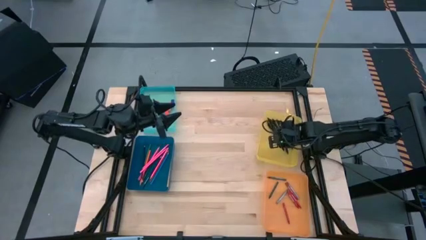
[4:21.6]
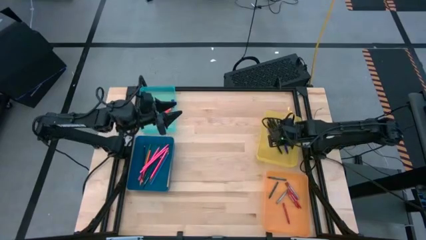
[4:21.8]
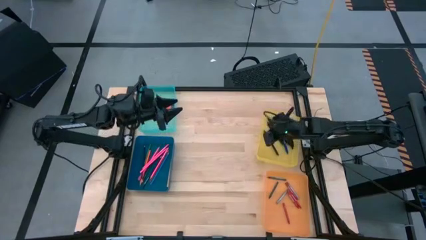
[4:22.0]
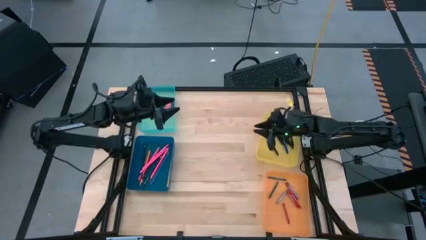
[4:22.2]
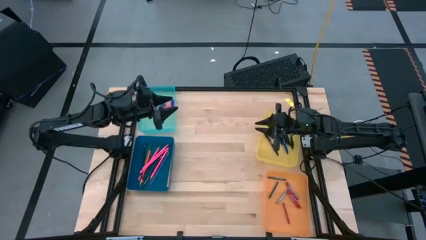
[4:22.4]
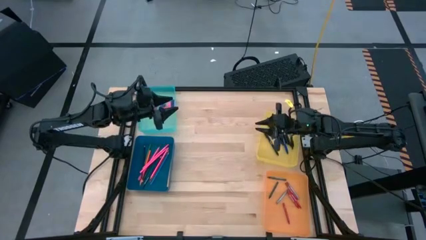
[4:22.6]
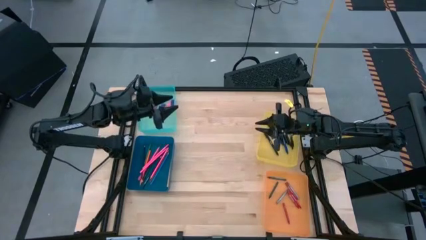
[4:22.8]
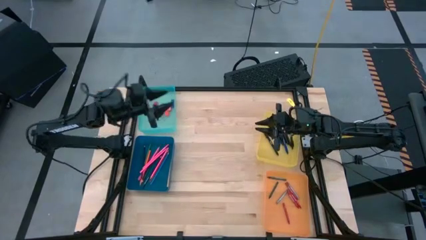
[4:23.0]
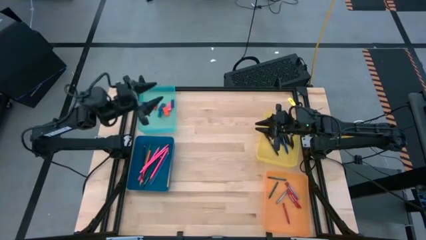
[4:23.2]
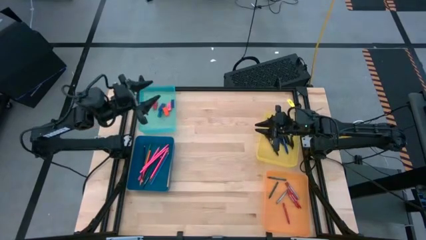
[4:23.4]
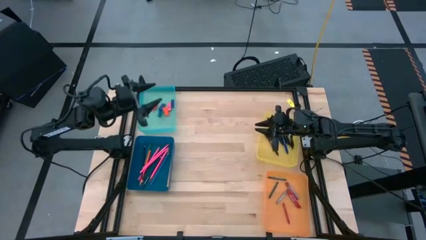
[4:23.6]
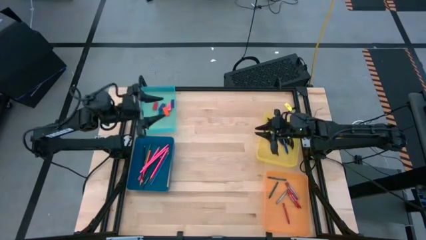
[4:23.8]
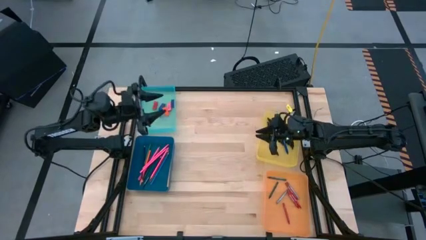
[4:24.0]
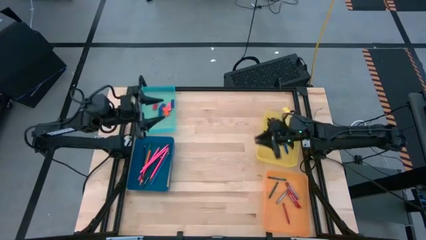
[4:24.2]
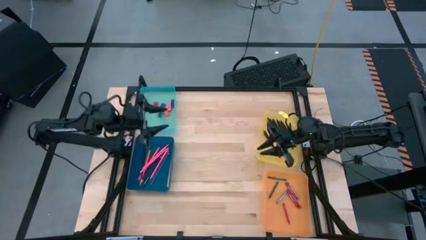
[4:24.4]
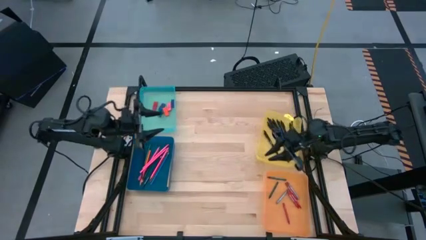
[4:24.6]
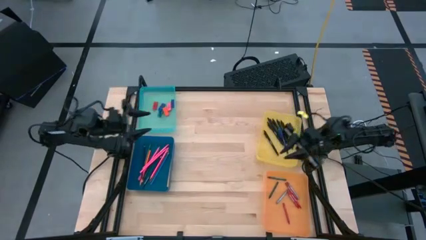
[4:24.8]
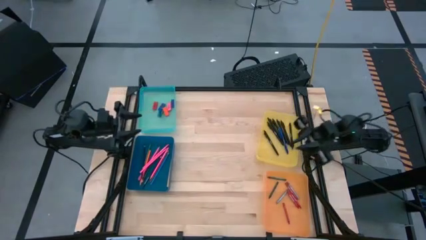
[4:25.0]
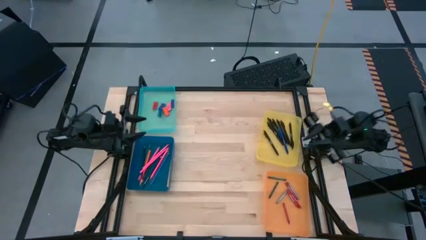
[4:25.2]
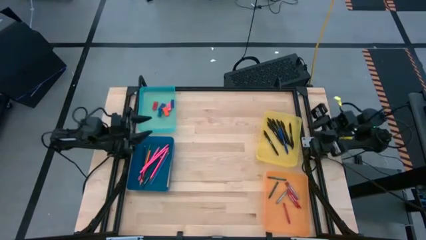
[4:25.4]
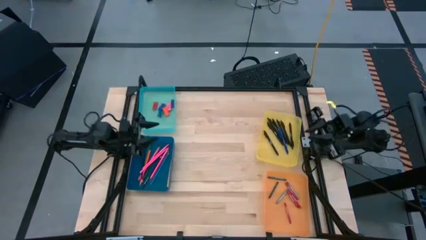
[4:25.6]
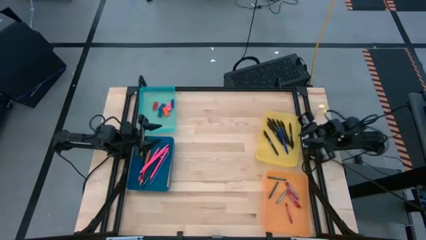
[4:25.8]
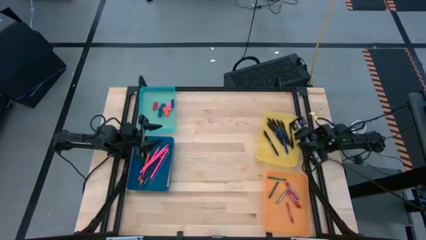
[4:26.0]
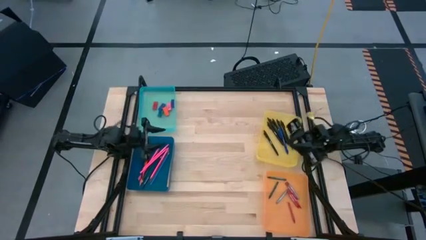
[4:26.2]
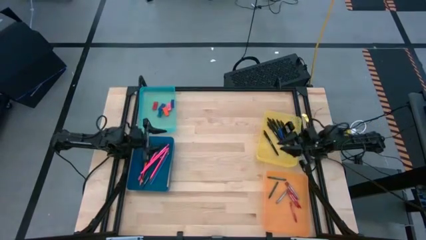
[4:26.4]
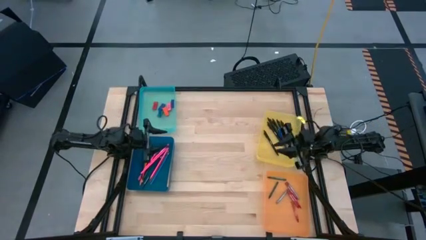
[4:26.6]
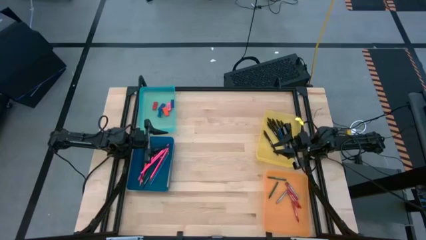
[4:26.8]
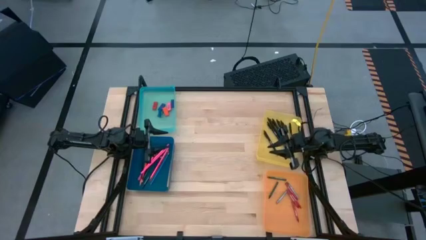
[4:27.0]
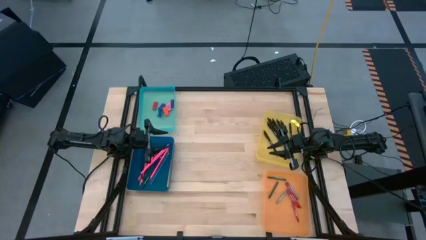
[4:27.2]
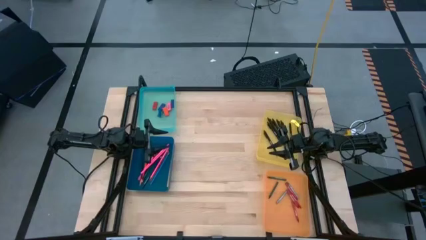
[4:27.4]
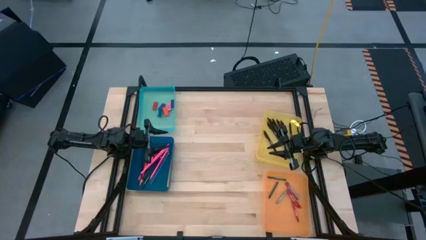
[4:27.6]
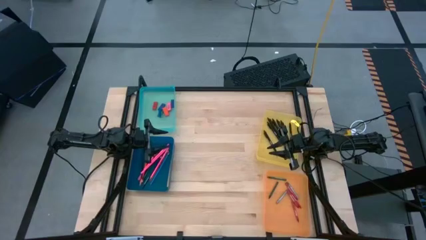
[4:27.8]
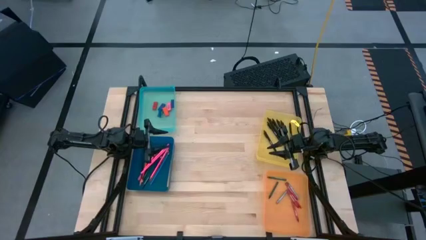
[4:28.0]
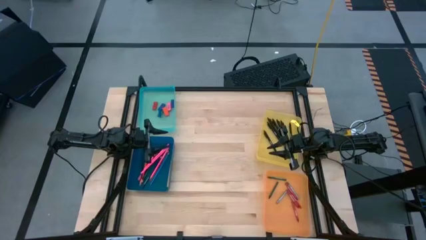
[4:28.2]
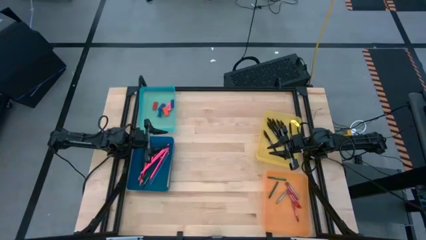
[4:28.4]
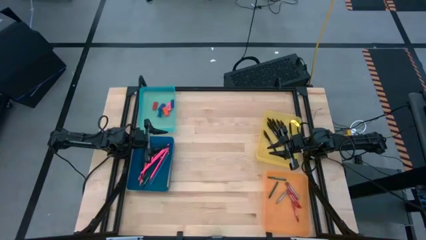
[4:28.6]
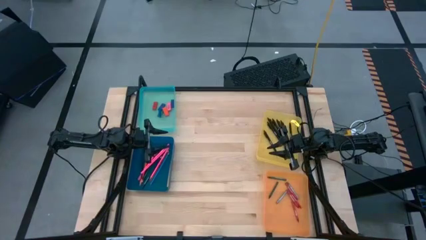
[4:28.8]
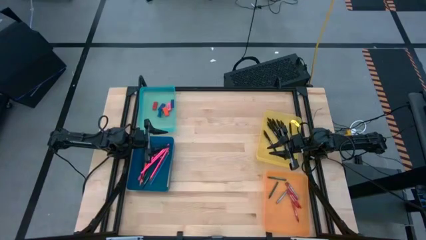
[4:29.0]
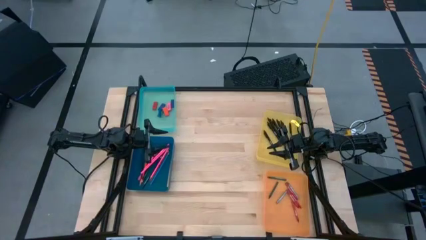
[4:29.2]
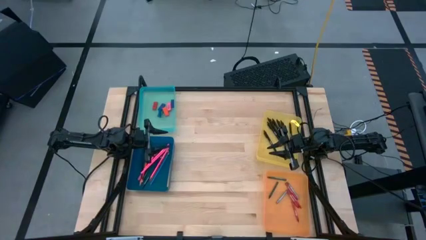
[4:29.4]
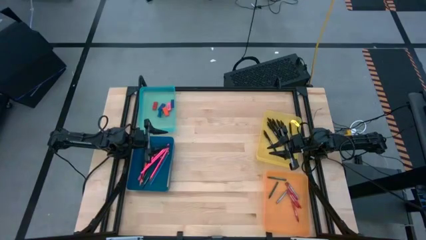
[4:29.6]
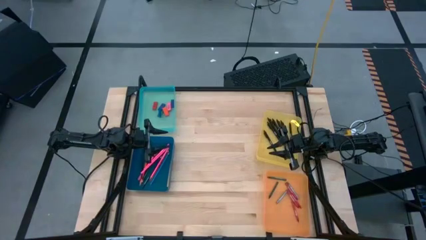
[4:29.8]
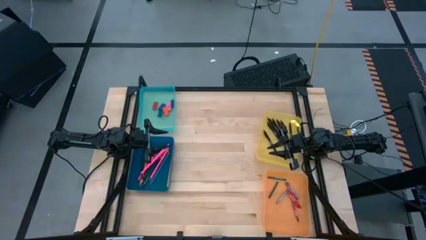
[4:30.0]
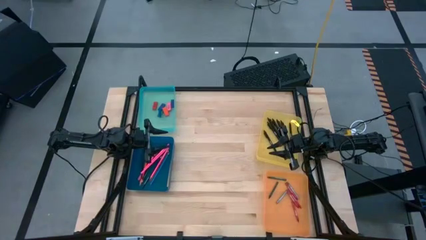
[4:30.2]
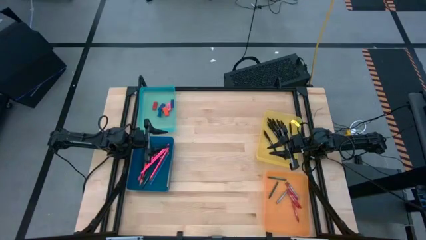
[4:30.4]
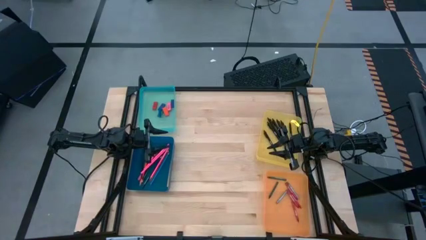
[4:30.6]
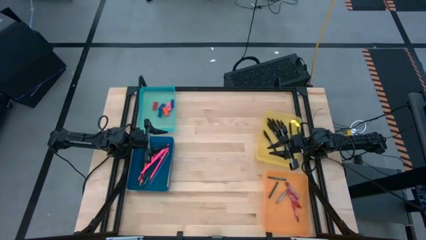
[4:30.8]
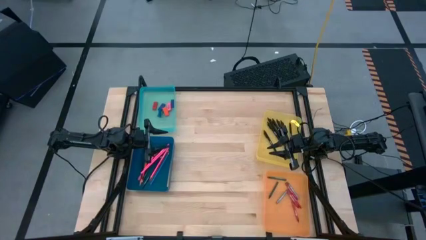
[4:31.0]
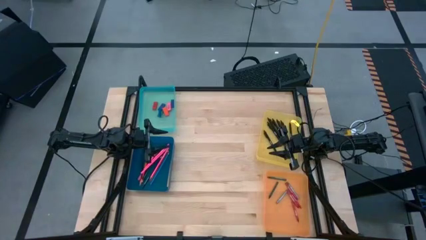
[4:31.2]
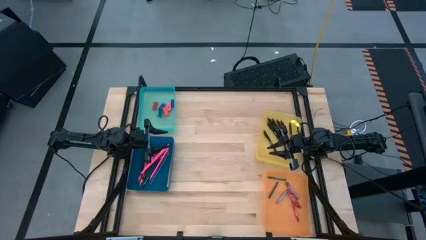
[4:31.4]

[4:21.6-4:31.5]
Task: Sort crayons/erasers/pens/pencils in bins
Return to Home Position

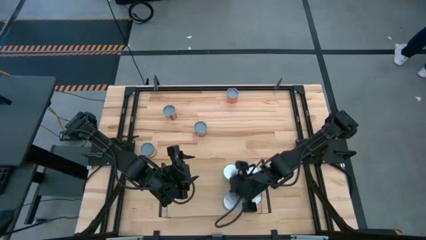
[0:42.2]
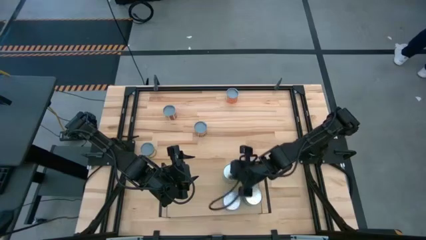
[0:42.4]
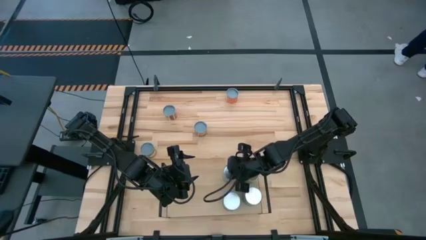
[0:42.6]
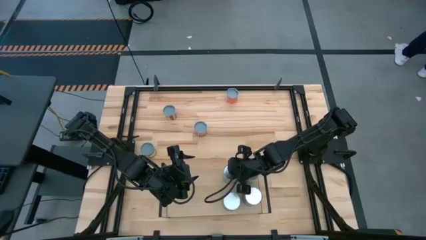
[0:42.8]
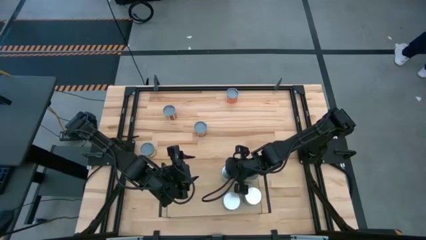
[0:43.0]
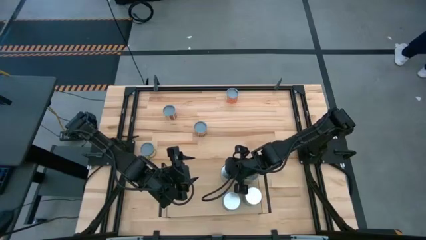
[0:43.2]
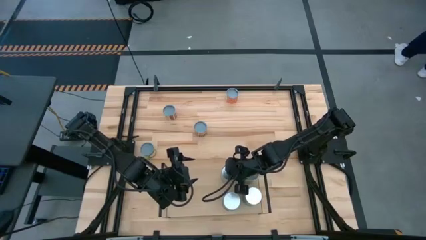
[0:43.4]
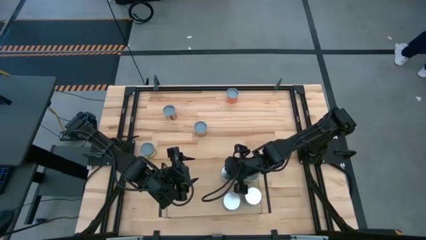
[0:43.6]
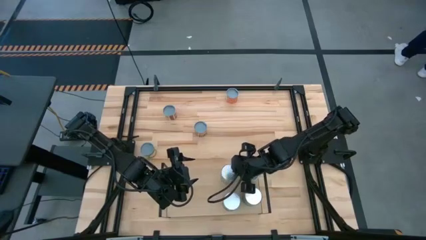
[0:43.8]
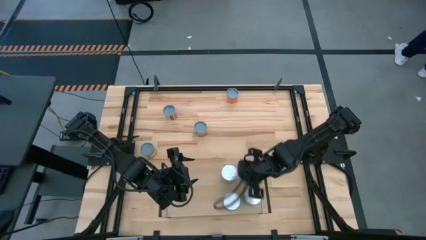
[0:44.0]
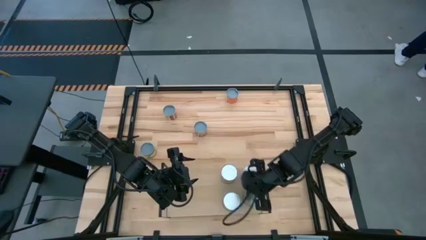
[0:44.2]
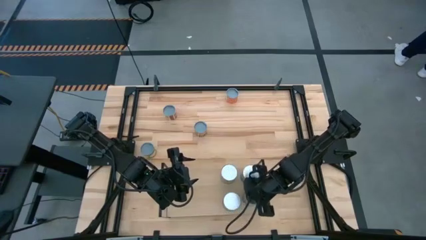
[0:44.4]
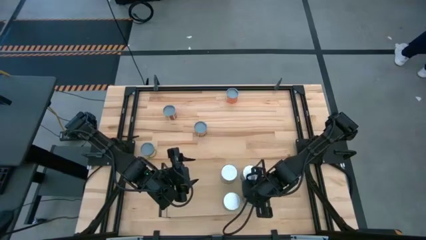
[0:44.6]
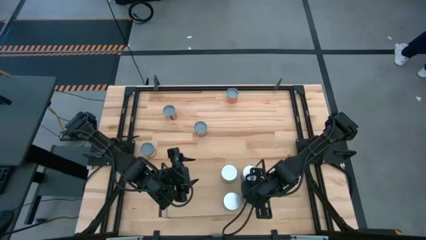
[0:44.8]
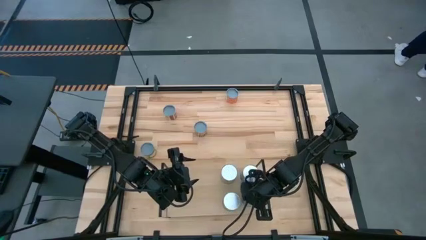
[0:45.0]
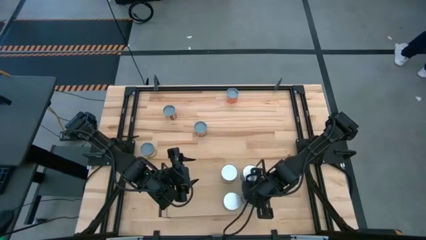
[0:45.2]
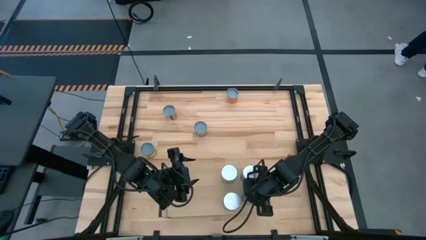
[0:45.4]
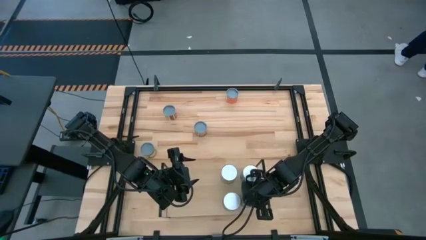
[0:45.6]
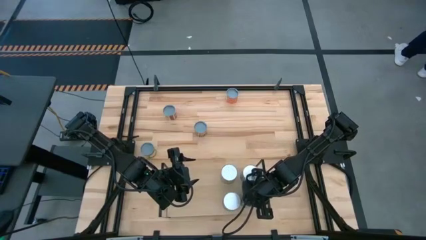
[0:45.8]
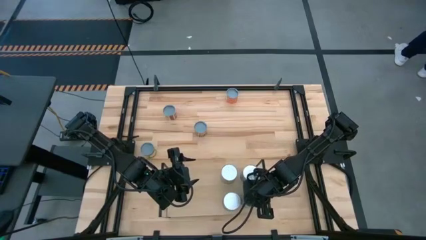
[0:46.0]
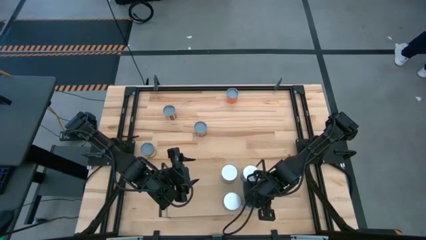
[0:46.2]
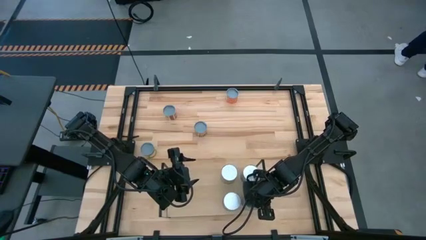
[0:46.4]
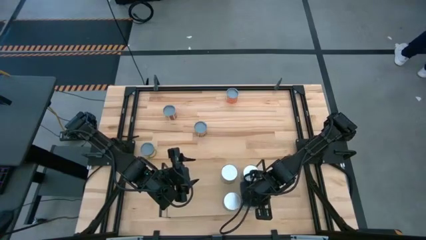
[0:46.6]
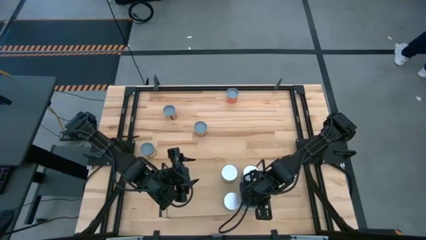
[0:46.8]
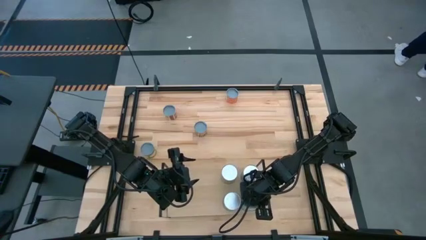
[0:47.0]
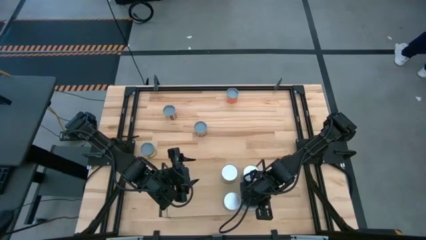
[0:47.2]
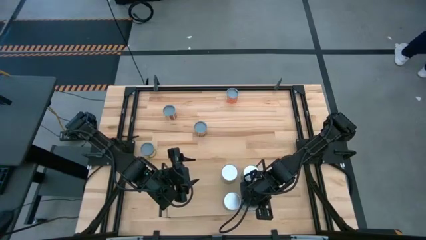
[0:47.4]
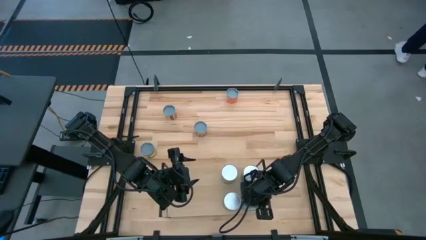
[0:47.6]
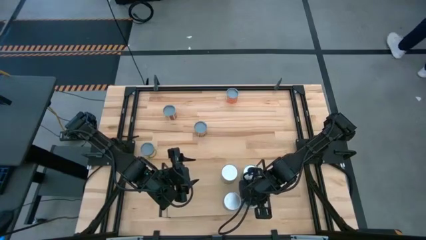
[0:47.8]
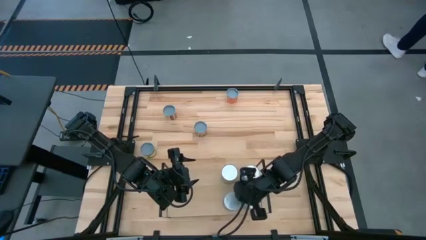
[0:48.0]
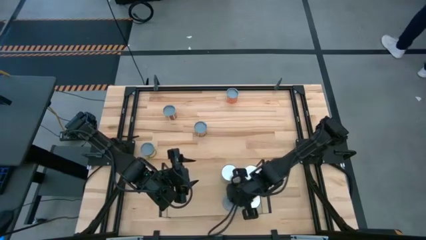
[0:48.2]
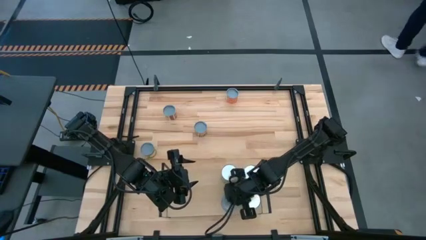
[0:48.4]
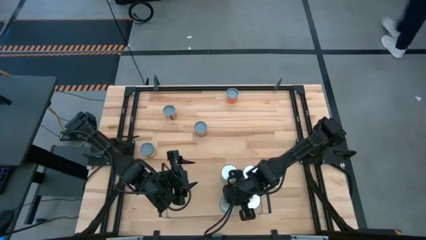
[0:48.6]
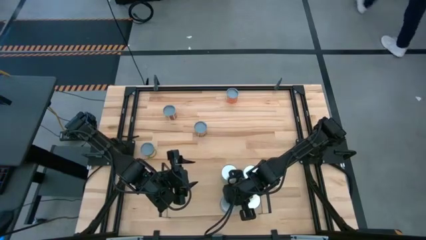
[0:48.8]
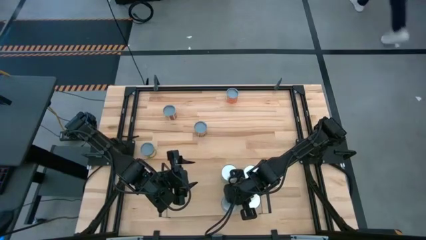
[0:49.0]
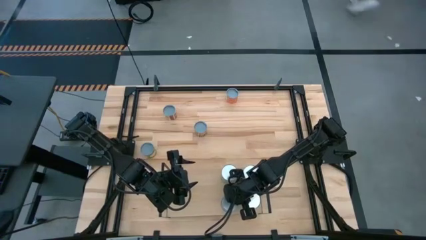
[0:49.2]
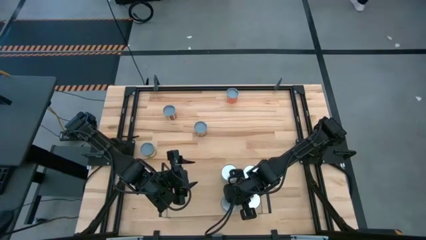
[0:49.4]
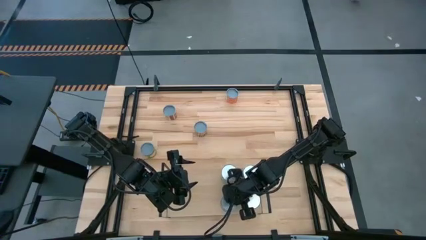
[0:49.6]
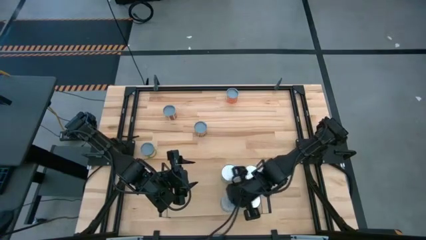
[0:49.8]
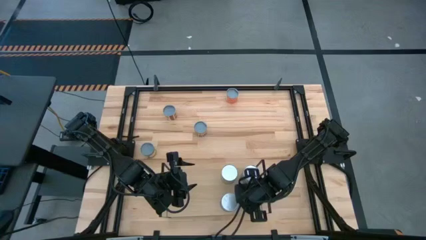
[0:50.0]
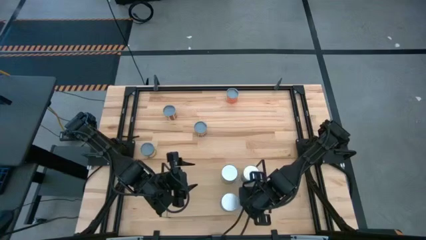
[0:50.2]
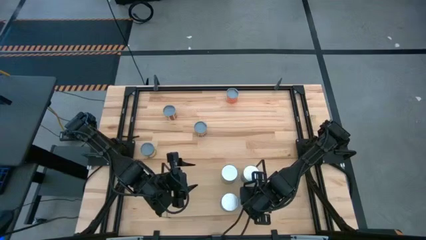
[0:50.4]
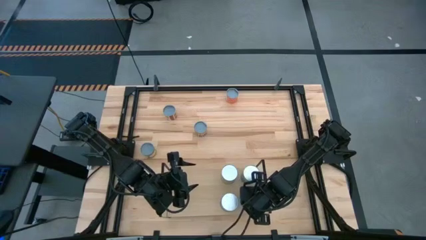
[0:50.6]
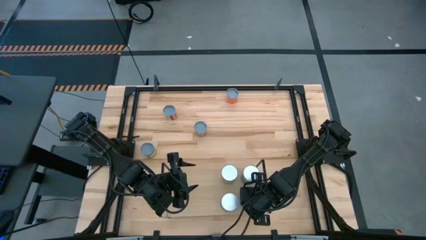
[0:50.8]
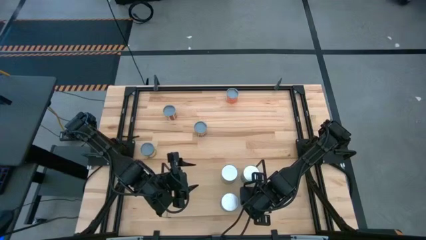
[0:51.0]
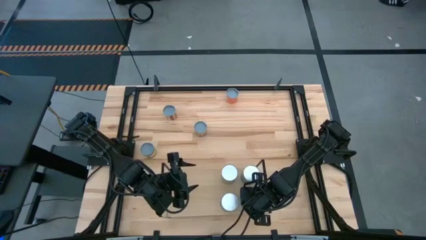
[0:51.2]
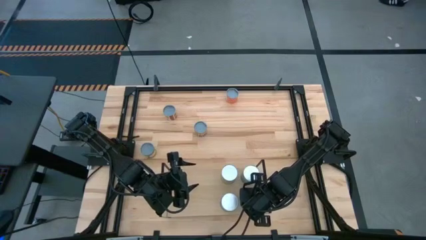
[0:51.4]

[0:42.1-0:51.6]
Task: Pick and place cans onto a shelf
Adjust the cans on the shelf
